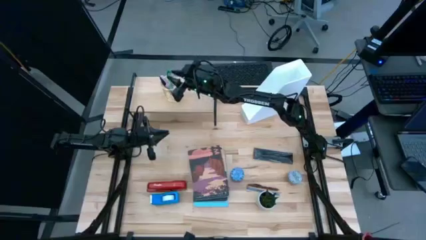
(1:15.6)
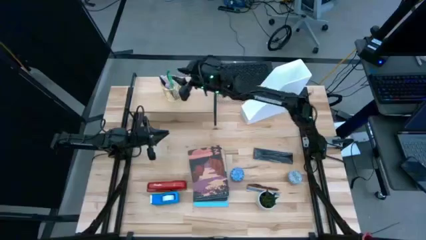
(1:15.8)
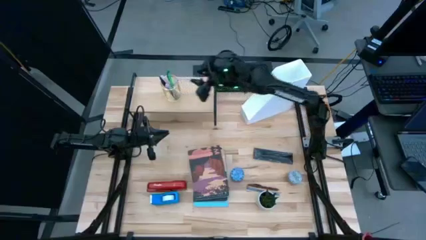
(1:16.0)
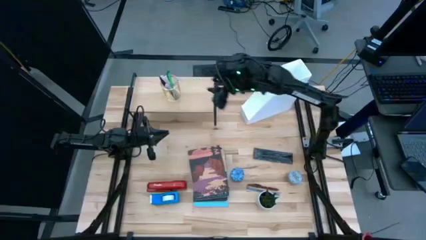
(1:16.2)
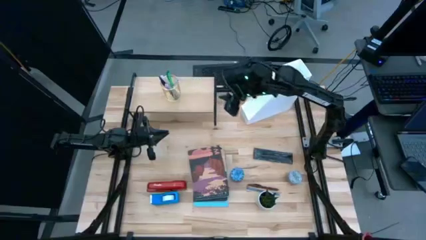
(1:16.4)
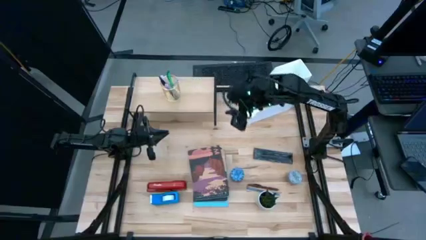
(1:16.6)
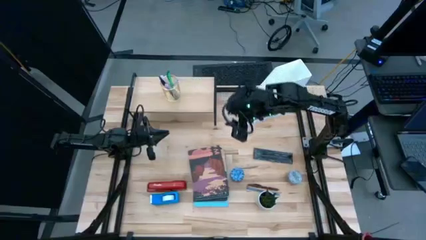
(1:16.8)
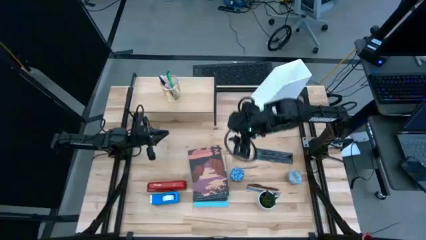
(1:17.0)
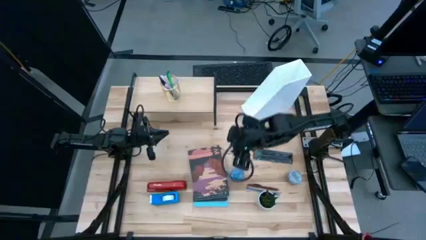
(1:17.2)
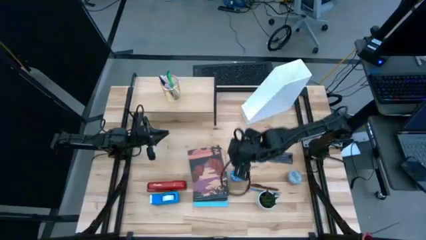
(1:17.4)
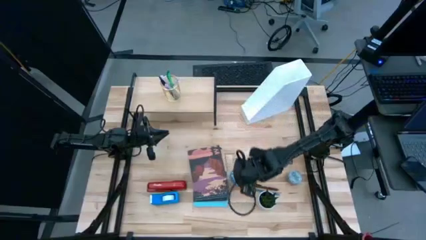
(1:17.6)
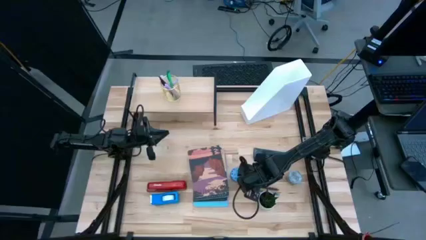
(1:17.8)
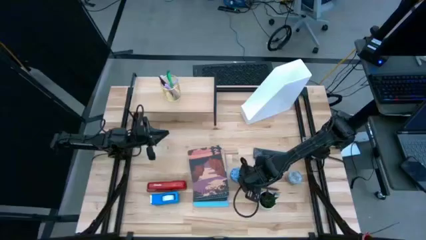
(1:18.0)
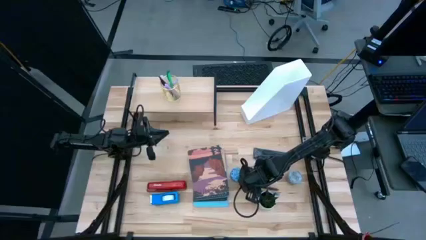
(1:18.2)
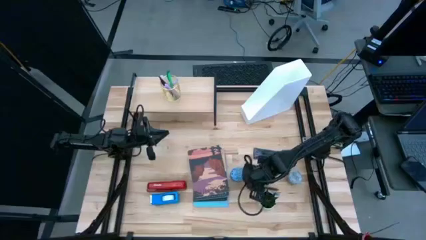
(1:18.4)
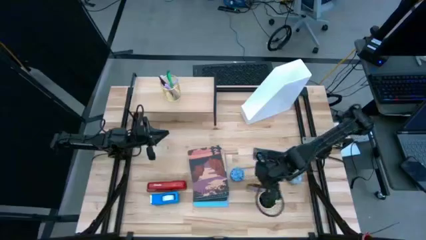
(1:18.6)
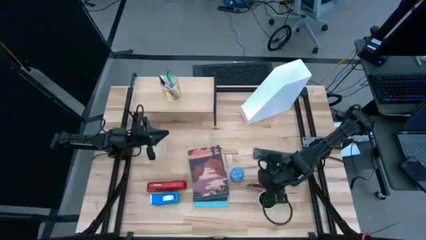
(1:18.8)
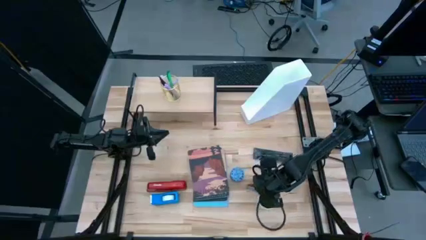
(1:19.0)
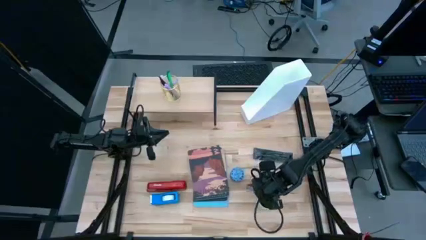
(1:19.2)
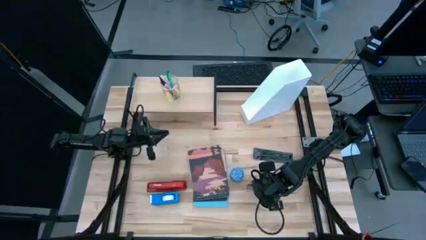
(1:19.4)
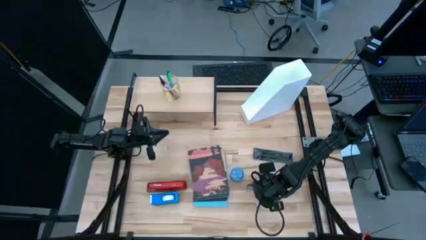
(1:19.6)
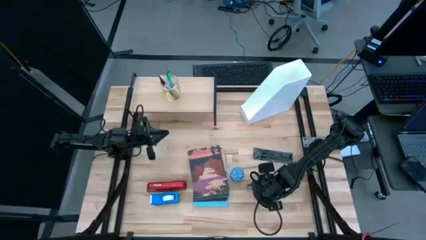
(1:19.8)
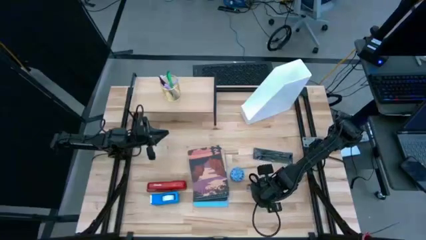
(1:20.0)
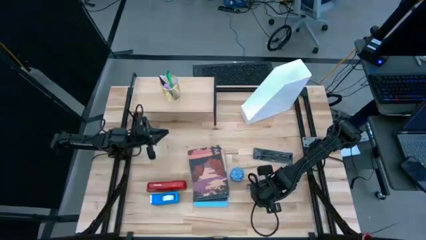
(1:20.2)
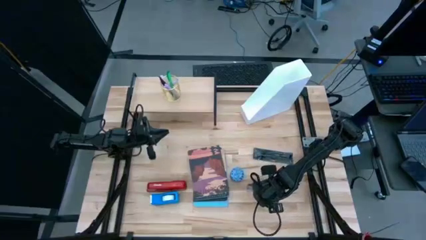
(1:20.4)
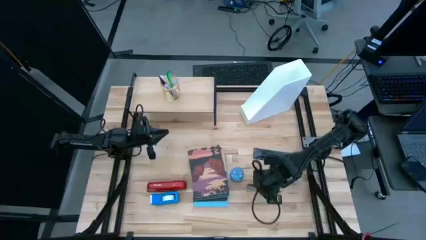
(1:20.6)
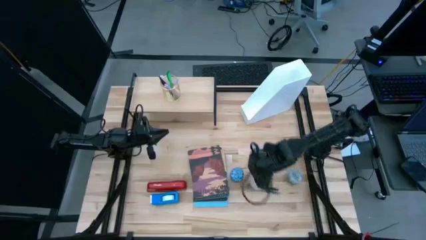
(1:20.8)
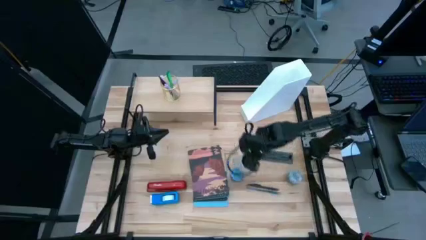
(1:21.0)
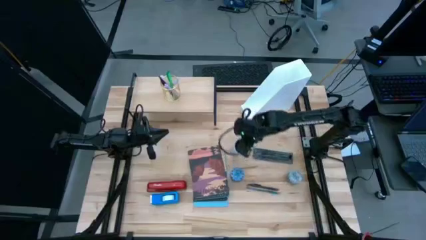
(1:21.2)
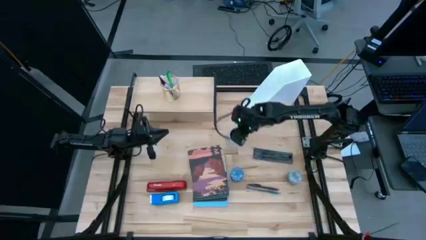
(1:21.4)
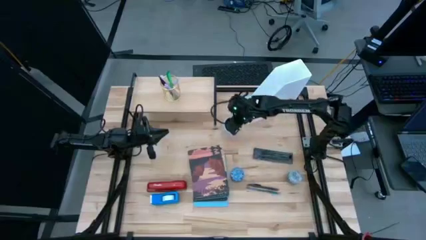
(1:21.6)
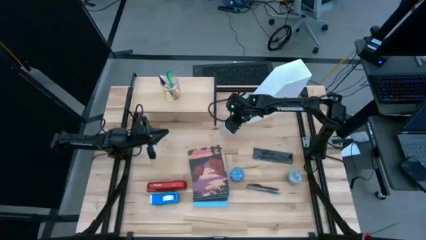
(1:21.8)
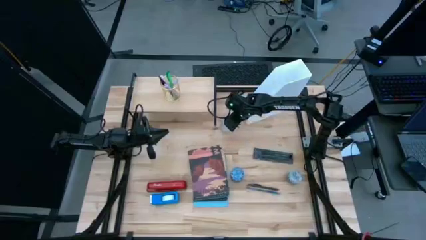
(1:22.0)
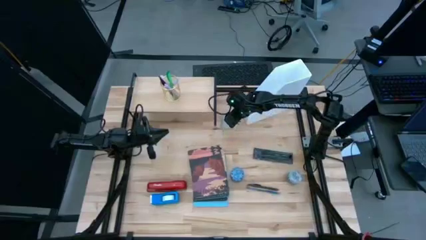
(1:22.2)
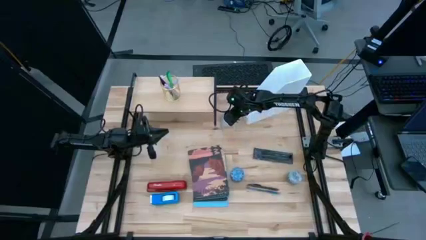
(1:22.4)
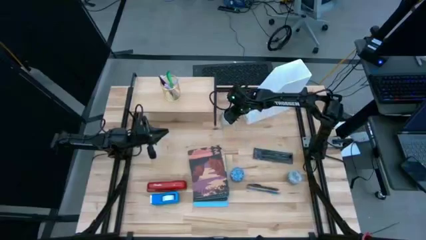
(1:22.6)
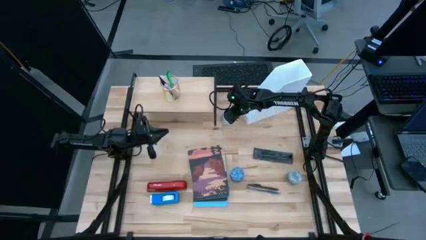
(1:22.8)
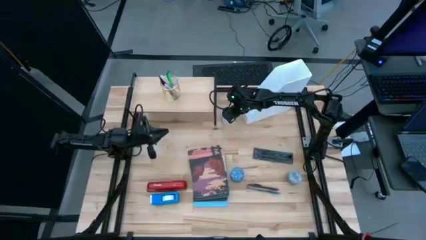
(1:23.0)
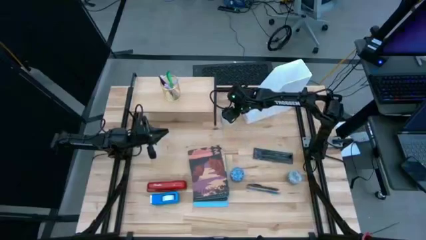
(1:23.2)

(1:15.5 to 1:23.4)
Task: Stock shelves
Put the white flower pot to the right side of the shelf

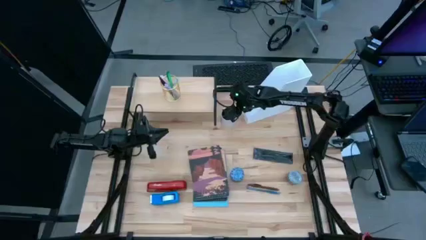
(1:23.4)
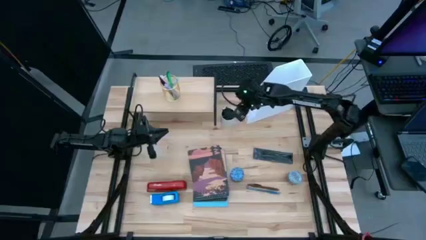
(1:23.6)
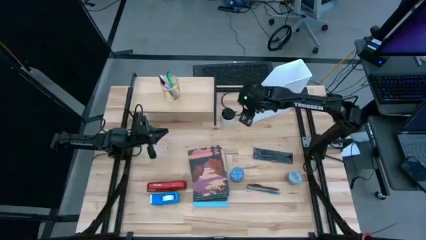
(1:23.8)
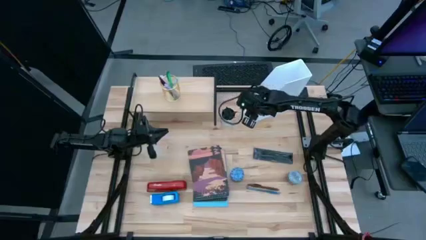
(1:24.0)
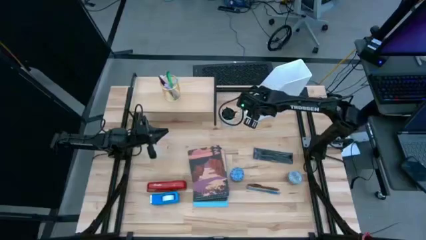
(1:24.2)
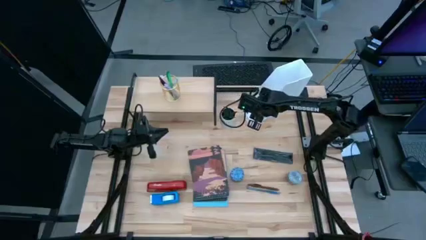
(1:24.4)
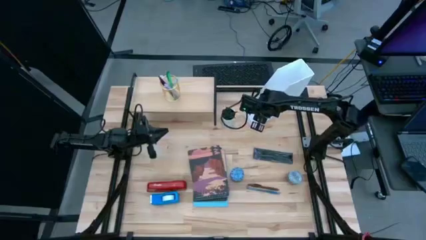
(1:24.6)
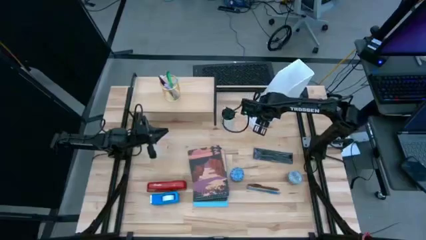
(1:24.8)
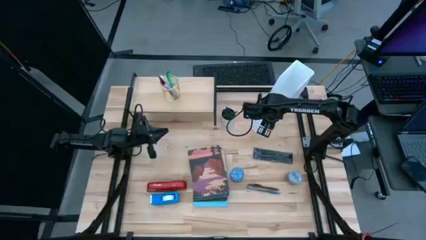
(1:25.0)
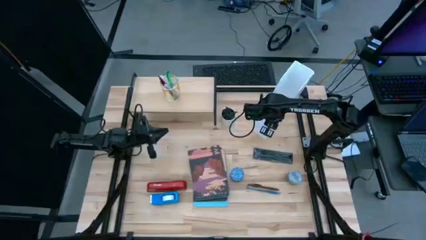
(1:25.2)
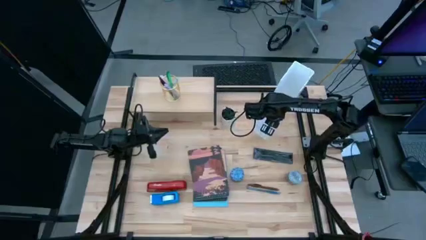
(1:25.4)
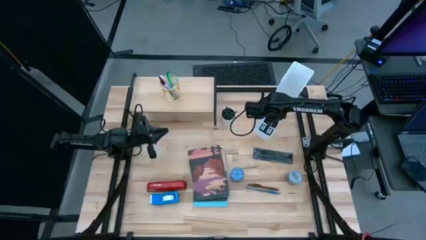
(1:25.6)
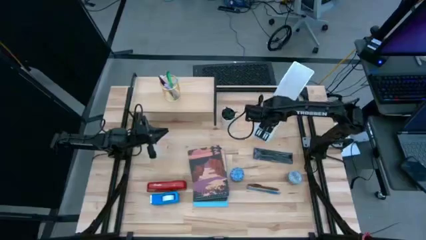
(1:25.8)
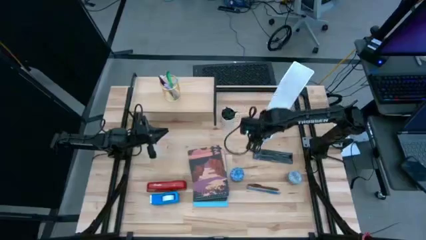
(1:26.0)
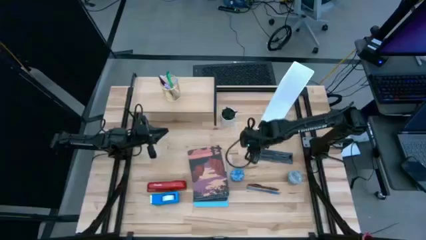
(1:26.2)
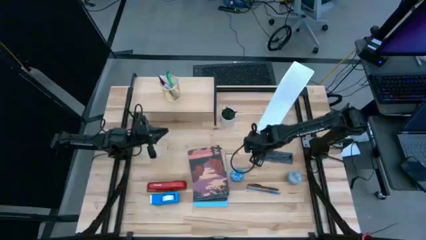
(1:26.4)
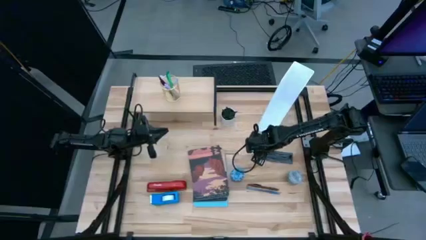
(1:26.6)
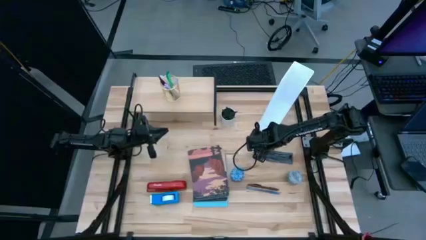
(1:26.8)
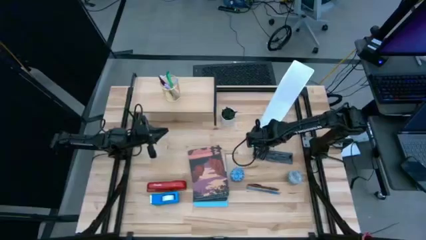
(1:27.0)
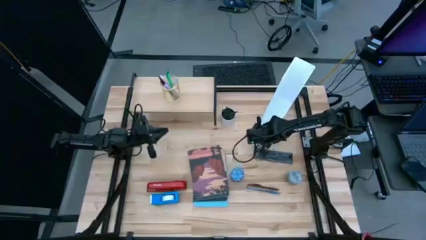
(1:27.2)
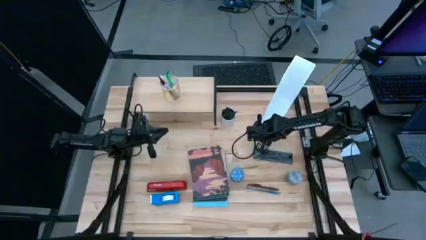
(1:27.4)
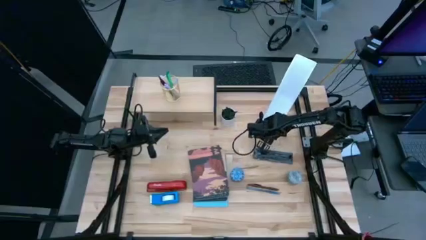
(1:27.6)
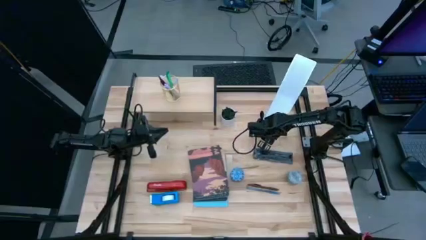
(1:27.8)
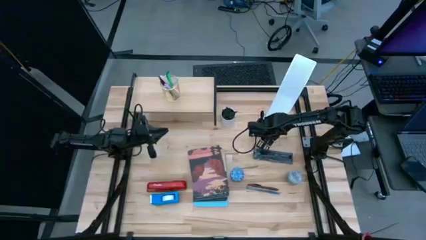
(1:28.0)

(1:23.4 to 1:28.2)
Adjust the white book shelf

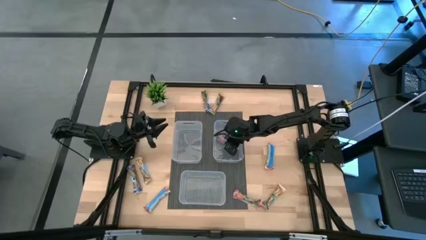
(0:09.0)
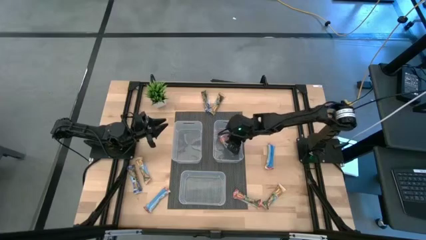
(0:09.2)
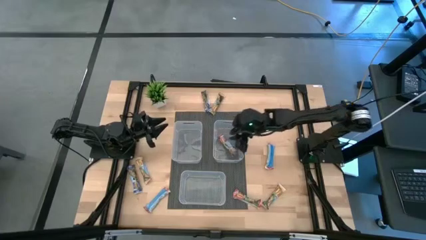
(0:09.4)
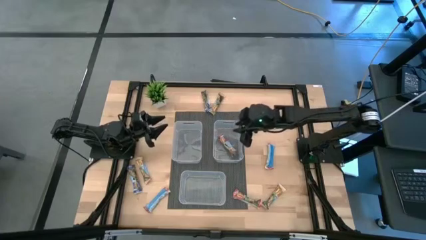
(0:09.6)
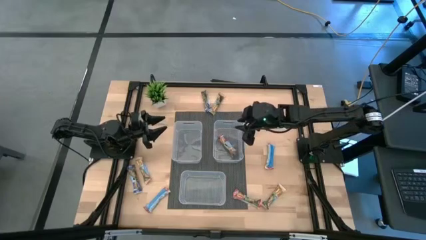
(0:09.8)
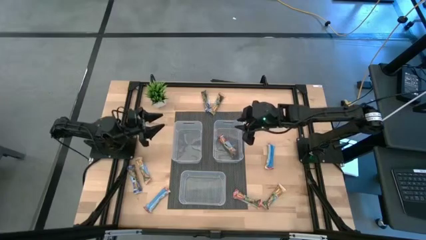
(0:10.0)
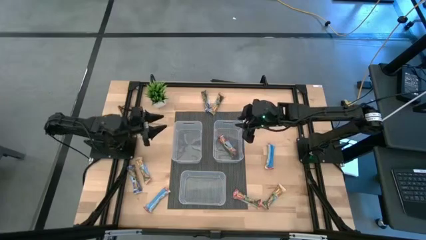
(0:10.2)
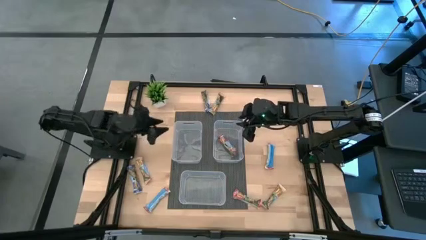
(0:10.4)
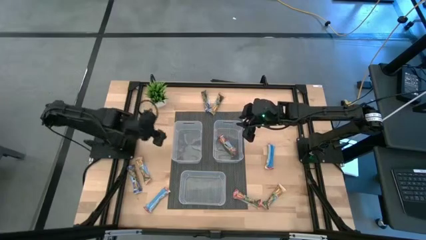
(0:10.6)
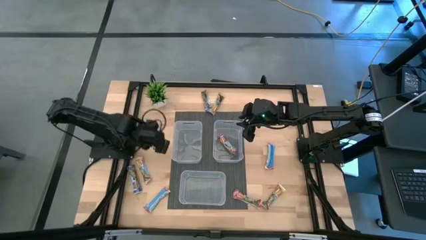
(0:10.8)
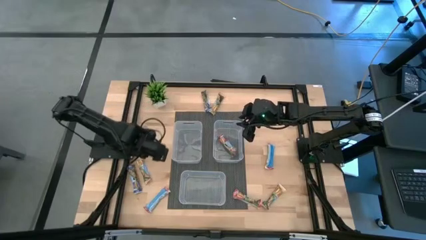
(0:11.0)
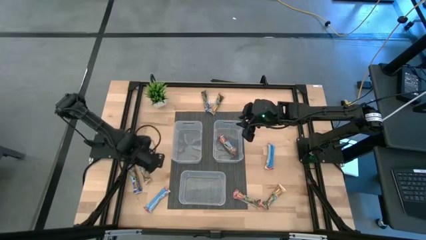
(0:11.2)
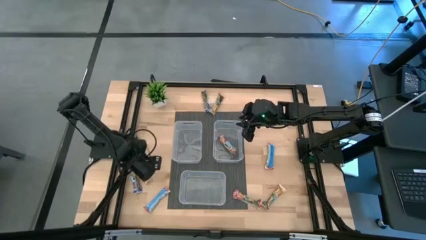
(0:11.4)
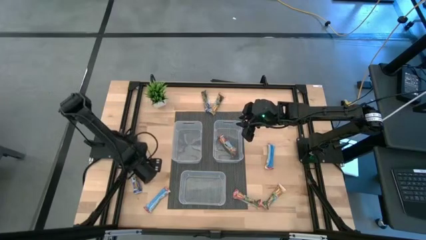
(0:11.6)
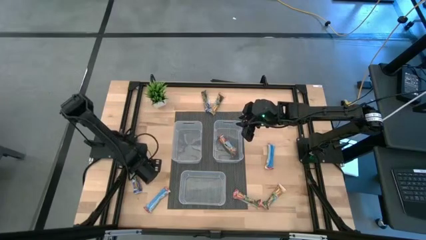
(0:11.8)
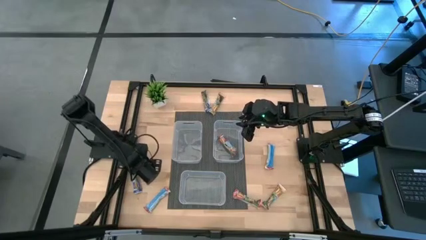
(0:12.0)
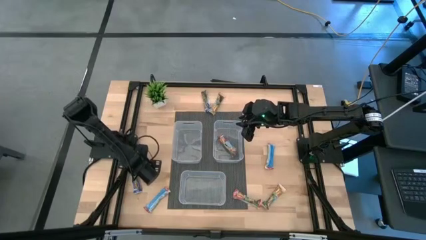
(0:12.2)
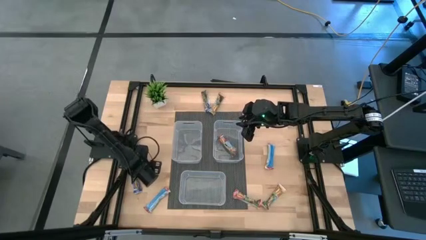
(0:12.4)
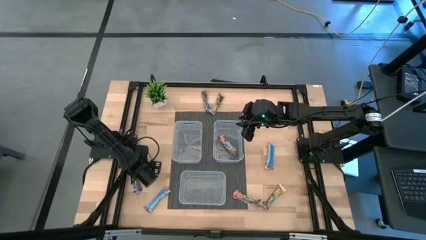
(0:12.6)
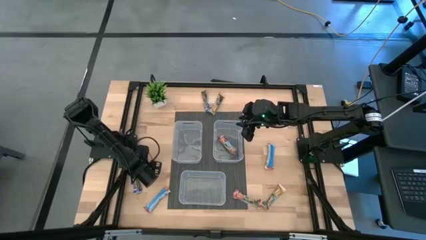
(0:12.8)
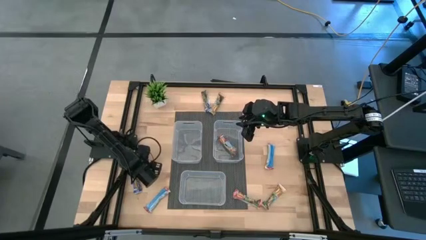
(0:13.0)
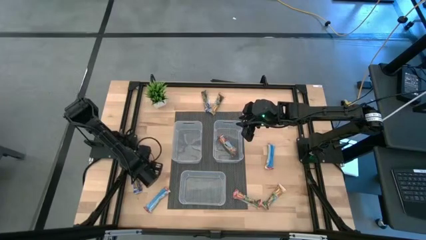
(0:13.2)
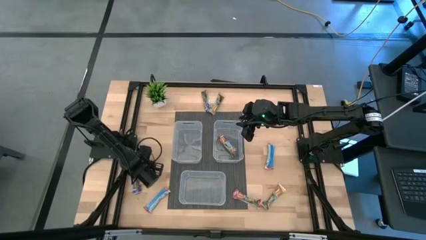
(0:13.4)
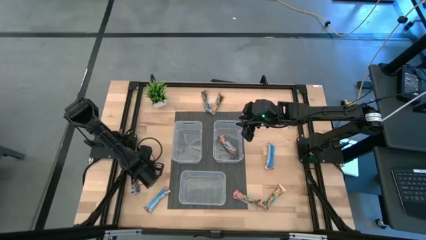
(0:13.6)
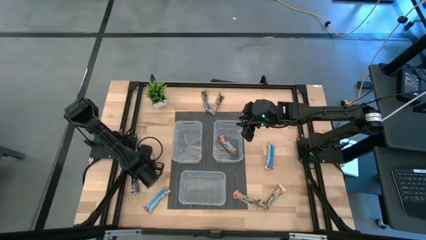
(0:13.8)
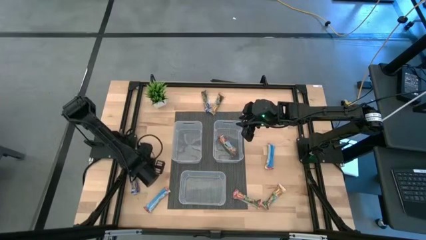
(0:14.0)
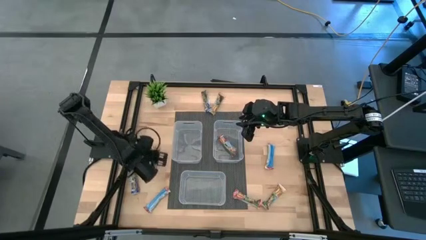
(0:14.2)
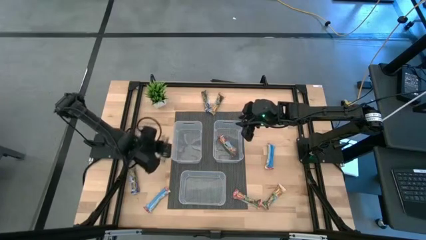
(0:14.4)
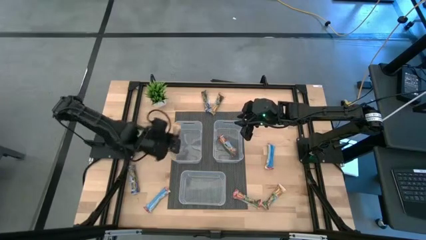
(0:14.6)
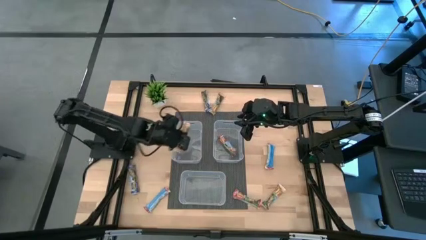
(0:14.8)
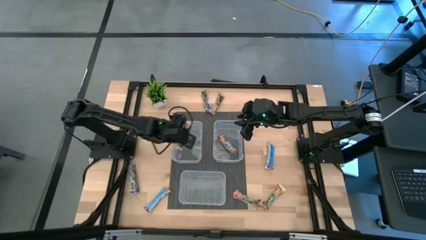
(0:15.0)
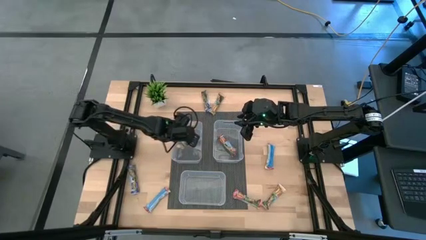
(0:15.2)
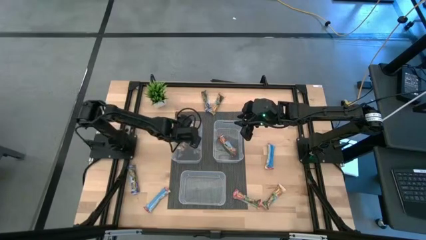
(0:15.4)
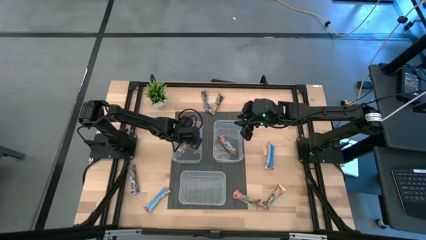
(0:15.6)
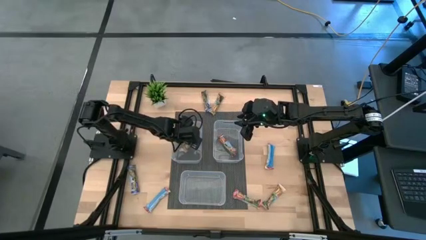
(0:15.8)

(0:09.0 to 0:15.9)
Task: Pick and place Granola Bars by type
Put the bottom left yellow granola bar into the top left transparent bin
